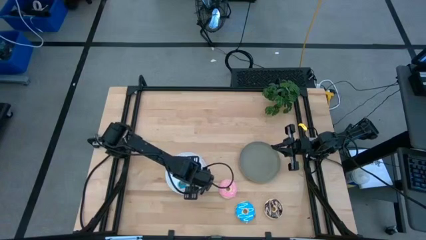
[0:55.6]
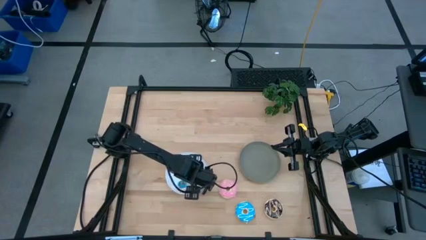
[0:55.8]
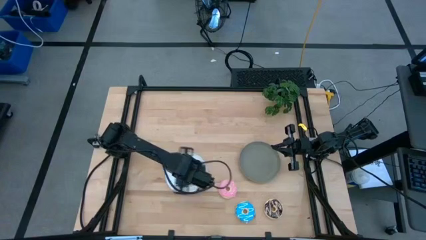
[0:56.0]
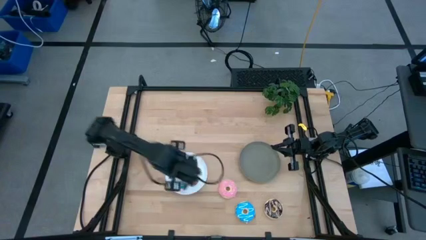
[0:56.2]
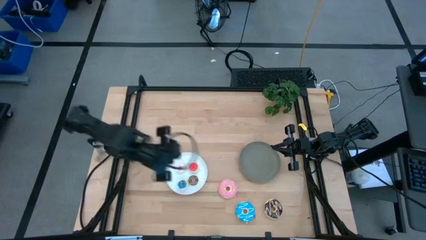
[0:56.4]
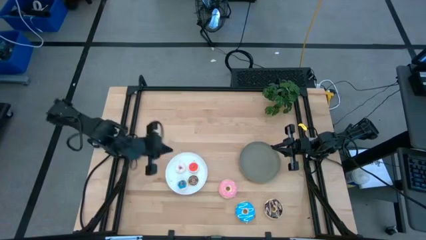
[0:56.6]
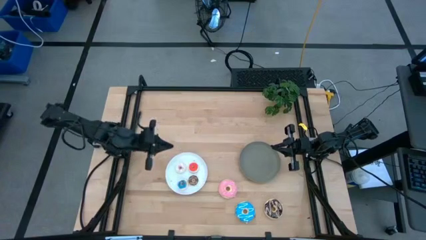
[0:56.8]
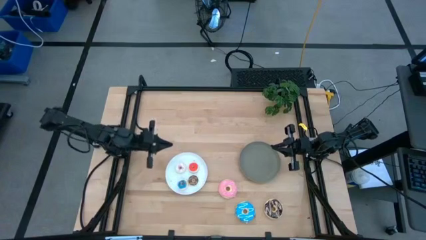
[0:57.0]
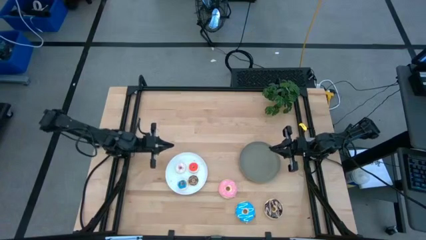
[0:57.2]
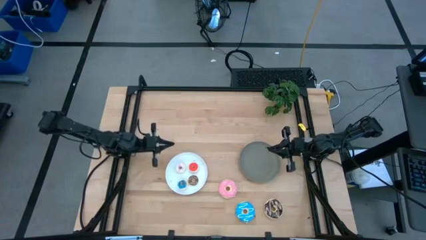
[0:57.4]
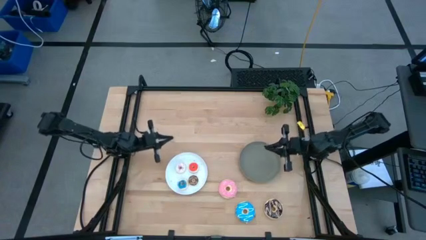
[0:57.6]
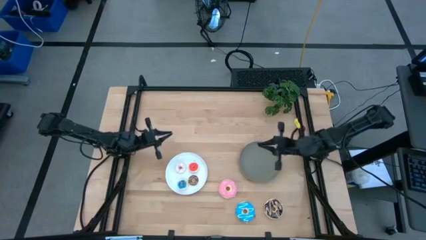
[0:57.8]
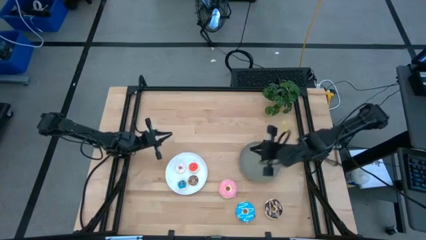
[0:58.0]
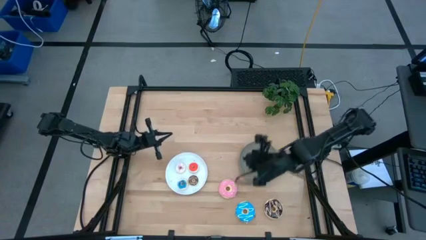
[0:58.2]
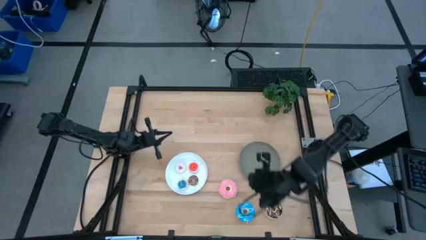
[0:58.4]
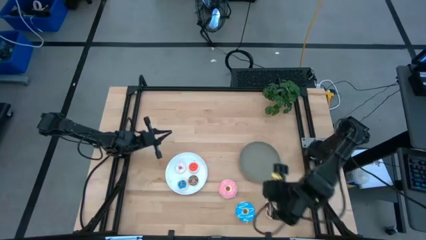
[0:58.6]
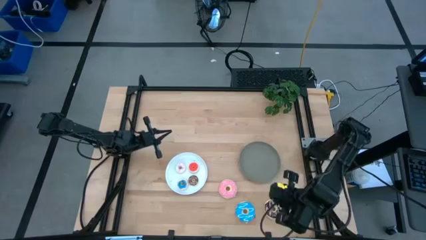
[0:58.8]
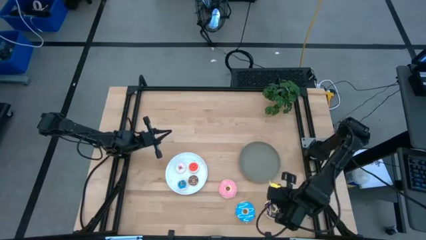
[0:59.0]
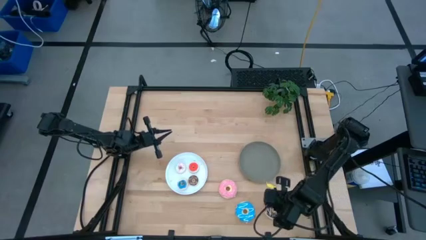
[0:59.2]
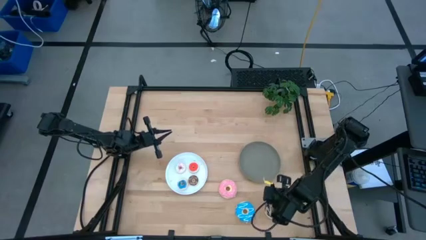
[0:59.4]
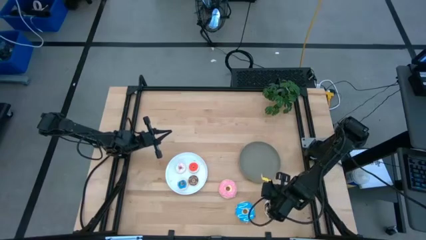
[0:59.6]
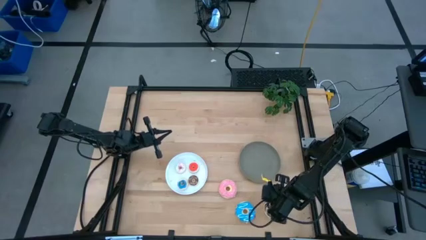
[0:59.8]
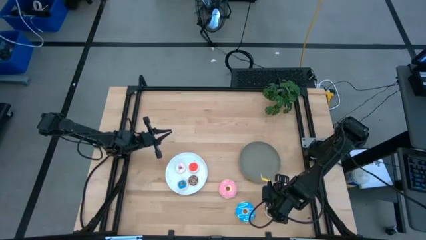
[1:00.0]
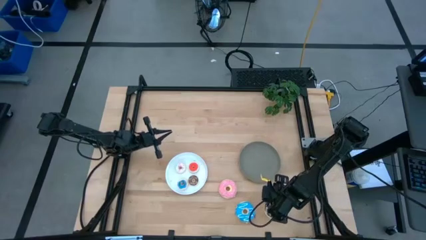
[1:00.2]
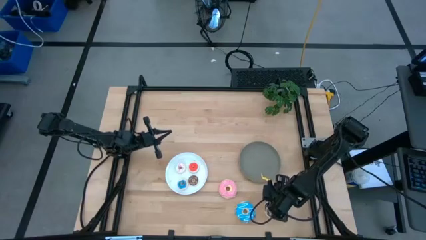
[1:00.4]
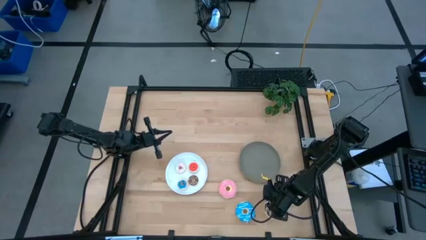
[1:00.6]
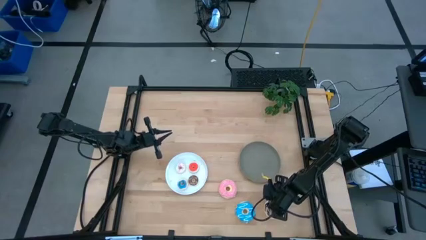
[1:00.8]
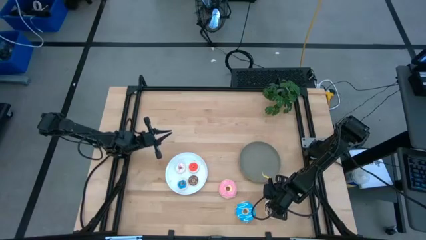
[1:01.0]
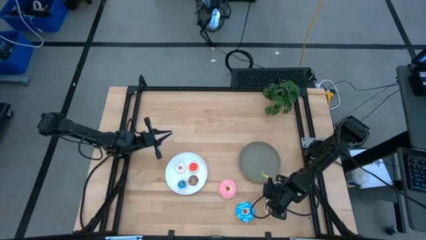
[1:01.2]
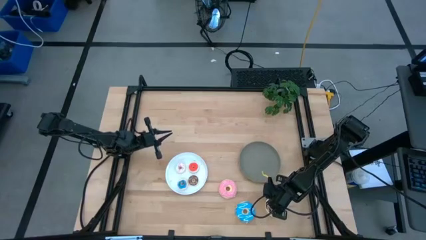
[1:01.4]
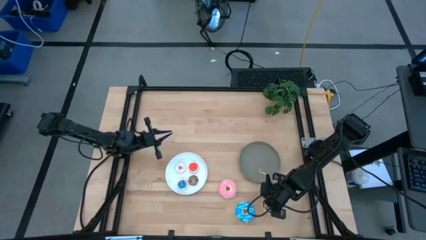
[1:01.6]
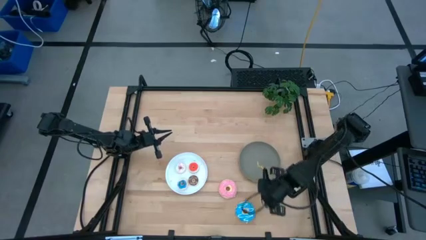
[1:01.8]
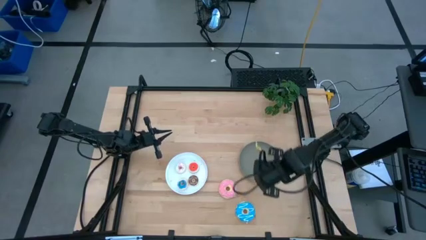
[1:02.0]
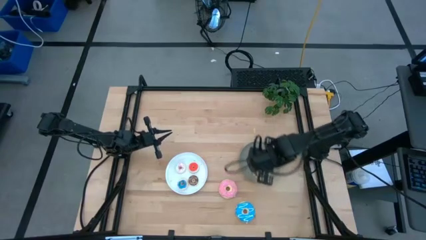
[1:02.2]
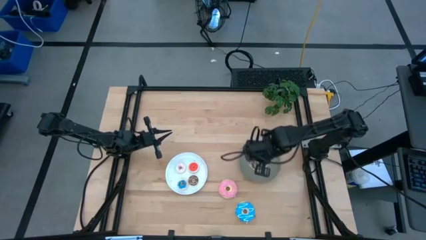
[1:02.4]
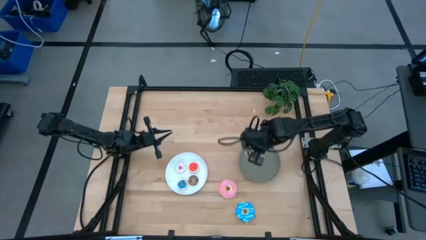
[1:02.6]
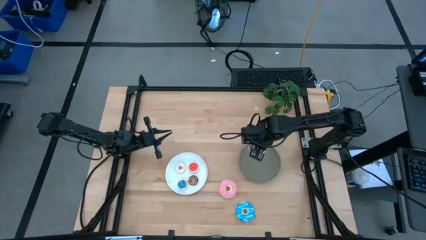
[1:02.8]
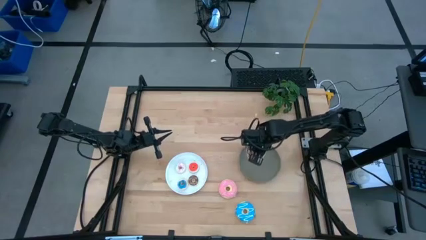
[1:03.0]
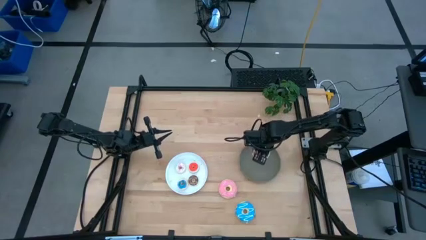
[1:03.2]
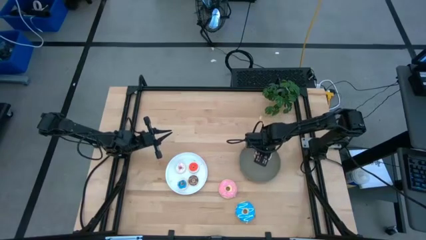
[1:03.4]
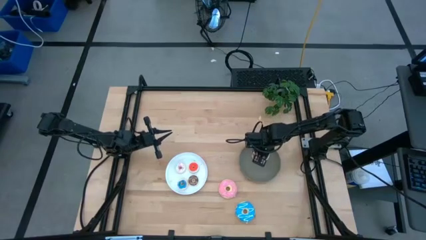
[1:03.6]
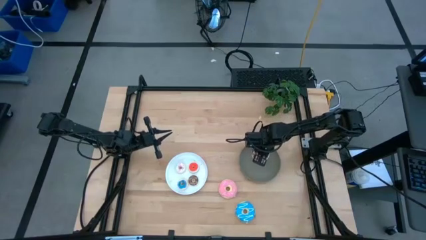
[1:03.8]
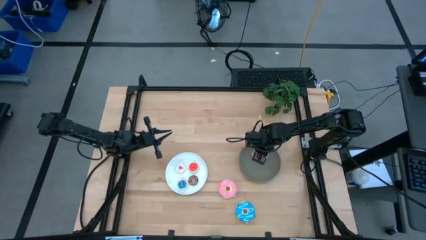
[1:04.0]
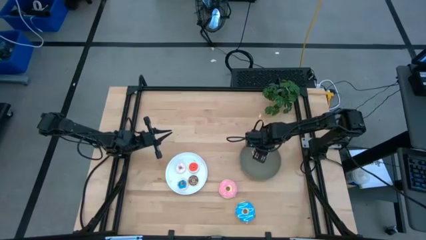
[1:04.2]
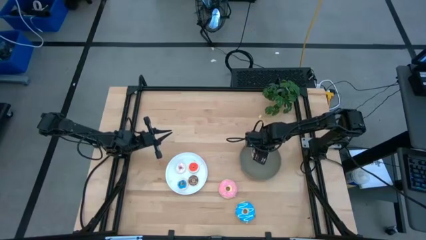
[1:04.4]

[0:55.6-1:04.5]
Task: Pick & Place donuts
Put the large black donut on the dark gray plate

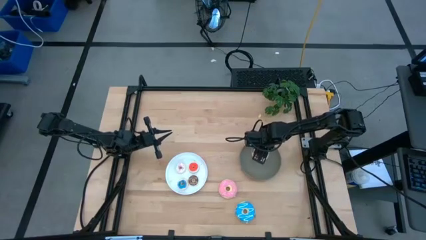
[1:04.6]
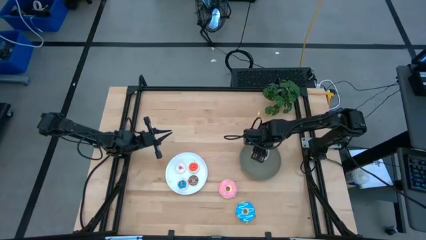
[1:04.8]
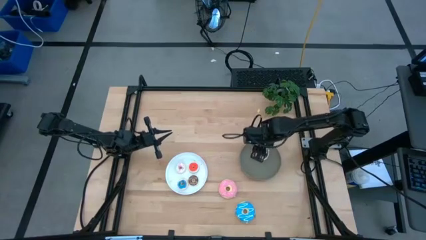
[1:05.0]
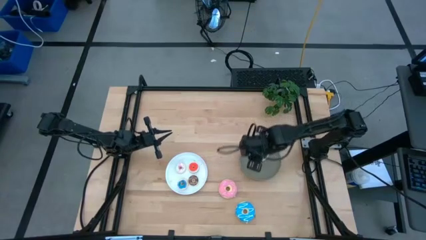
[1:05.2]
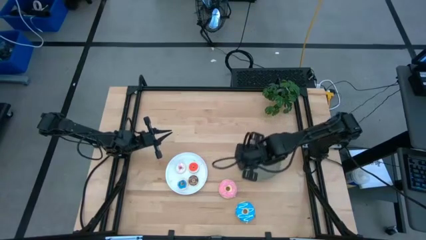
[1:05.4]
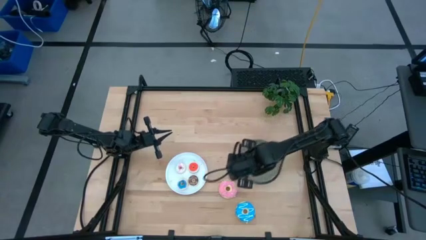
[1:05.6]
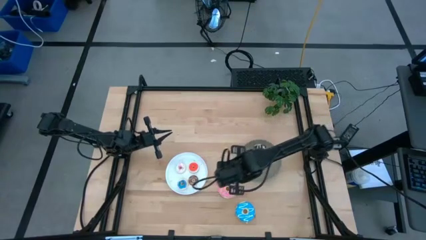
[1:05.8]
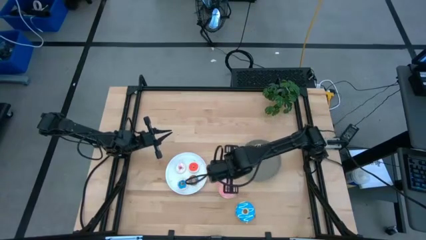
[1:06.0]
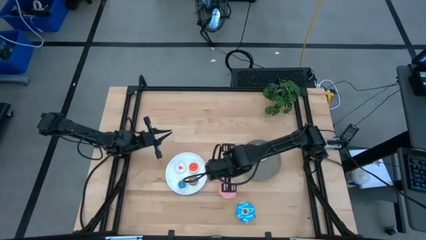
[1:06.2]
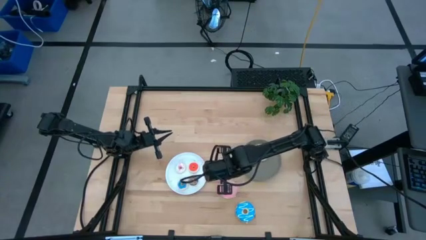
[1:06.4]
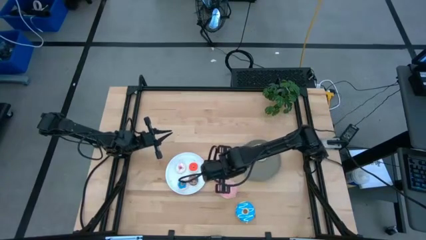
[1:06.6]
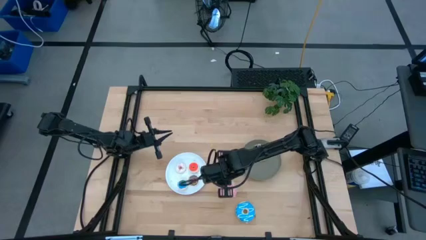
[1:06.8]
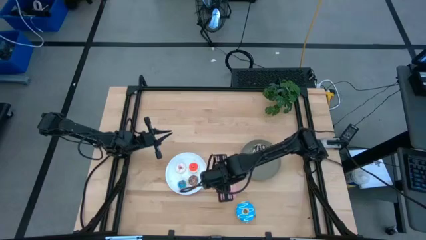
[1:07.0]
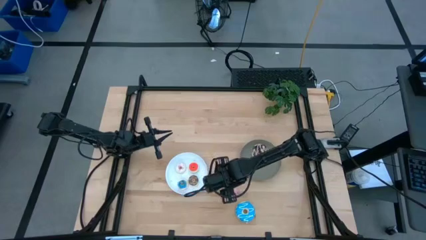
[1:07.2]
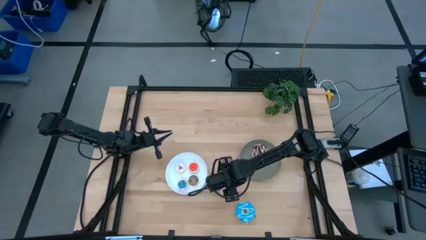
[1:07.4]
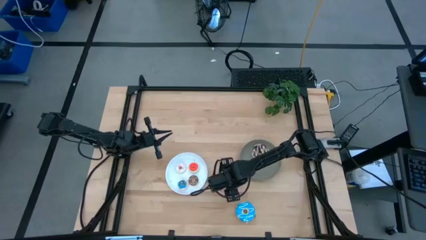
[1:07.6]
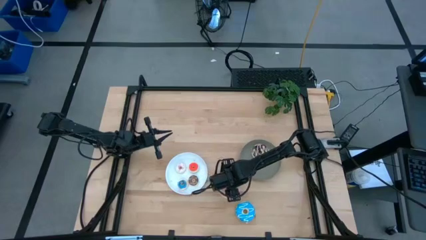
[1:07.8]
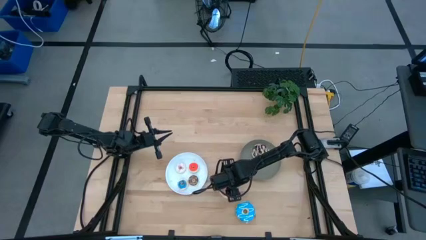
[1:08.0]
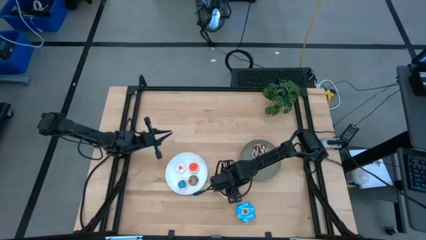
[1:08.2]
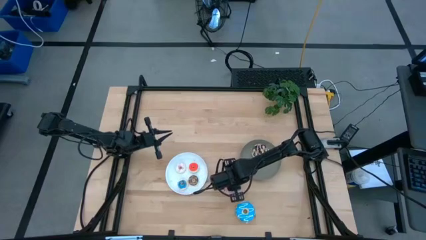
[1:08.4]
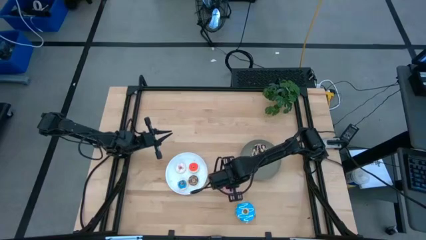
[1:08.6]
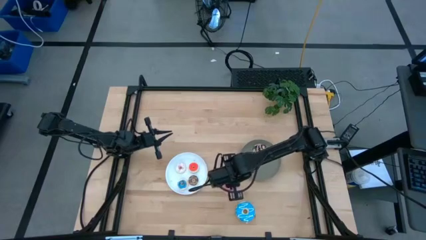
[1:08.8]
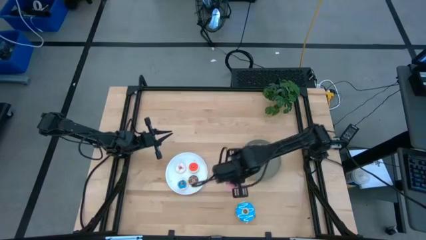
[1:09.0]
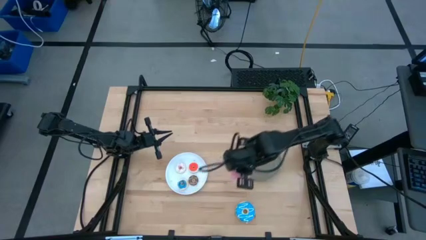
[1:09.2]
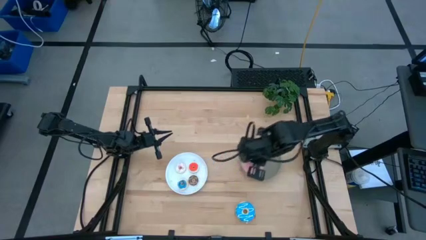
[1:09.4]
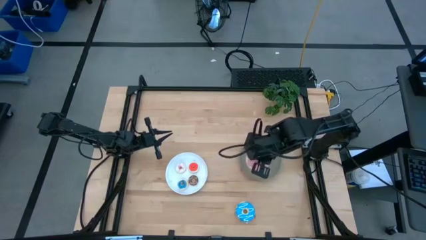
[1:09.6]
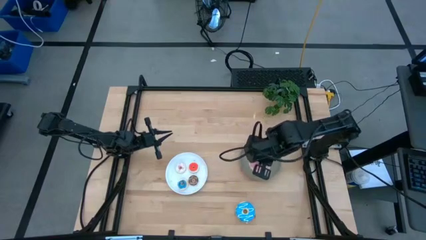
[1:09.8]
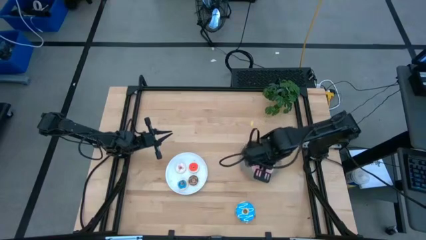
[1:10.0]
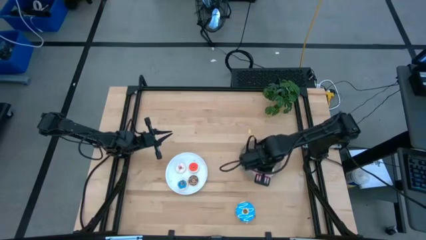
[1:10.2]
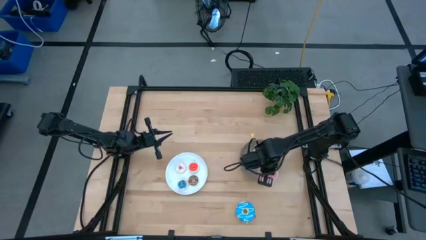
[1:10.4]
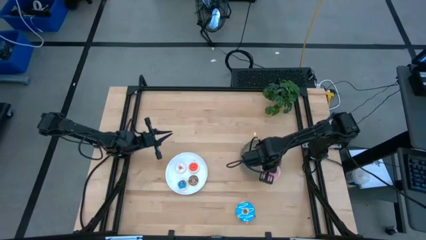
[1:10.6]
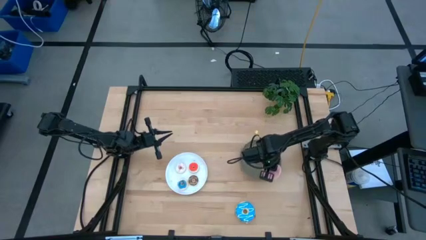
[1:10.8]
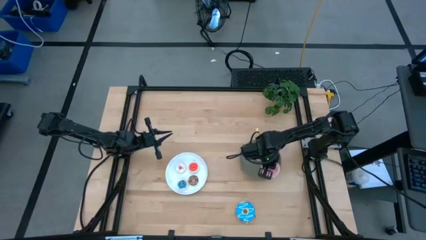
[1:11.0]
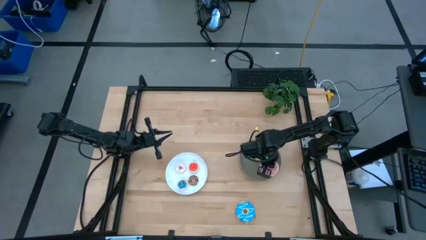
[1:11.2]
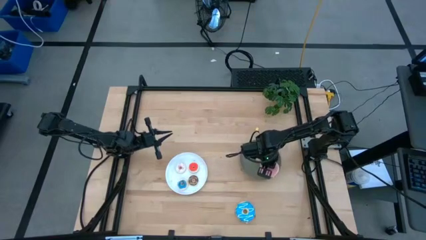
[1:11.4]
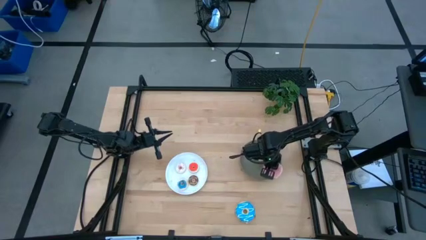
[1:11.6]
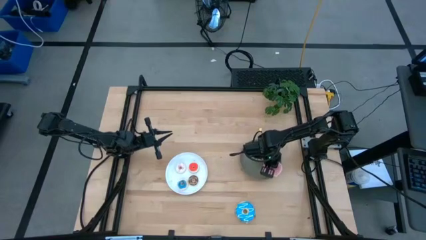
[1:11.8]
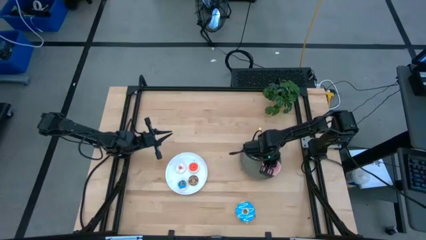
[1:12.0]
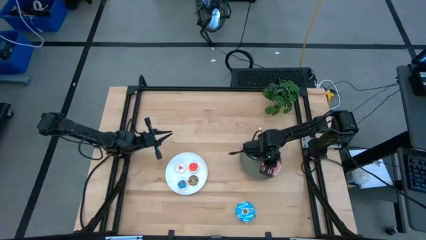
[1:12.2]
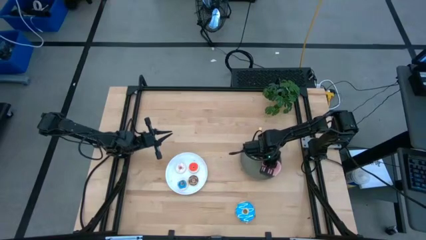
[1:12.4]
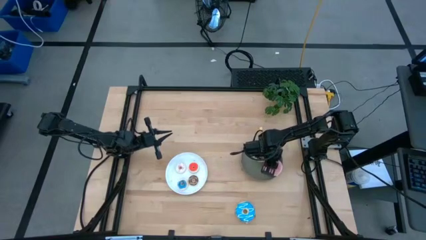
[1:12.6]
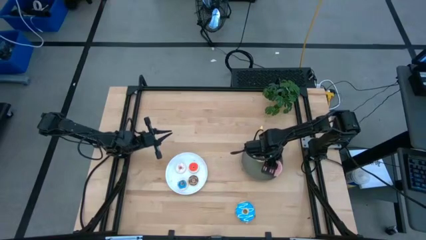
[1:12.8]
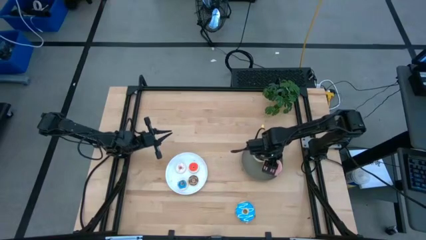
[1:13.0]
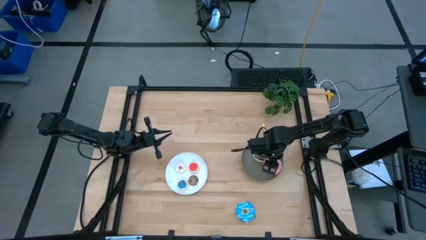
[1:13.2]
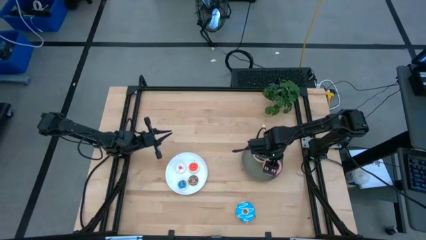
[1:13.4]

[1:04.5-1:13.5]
Put the large pink donut on the dark gray plate
